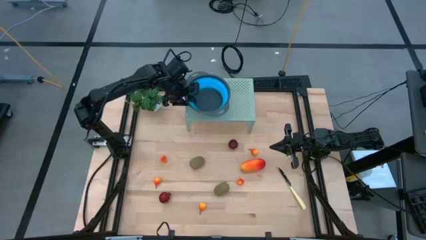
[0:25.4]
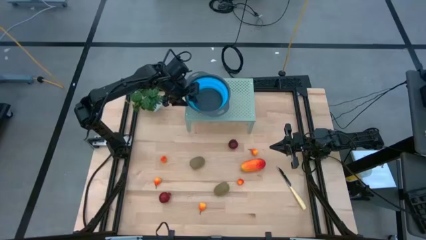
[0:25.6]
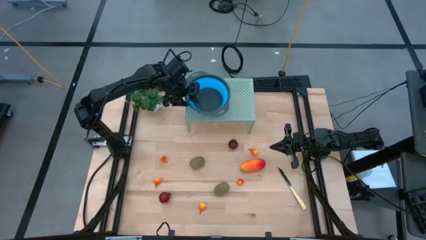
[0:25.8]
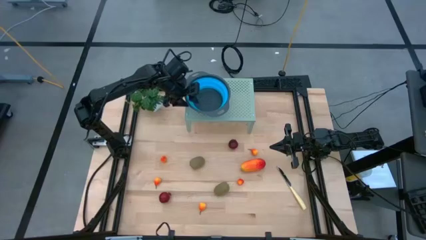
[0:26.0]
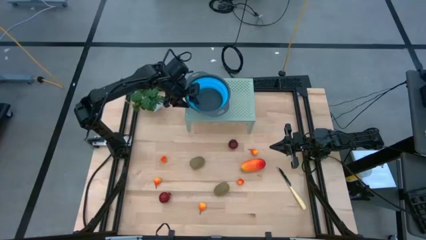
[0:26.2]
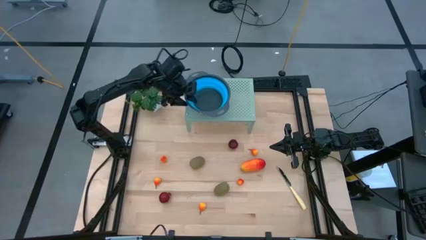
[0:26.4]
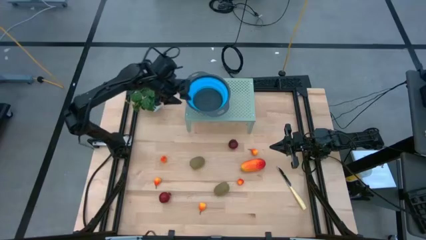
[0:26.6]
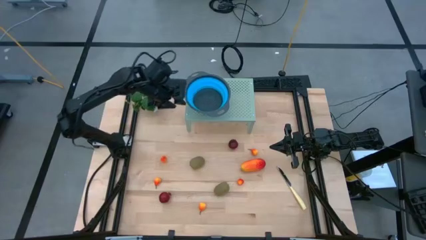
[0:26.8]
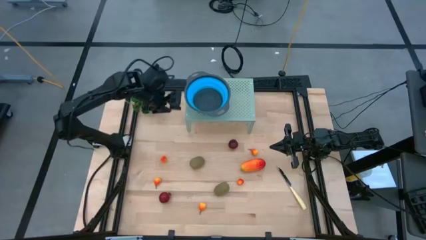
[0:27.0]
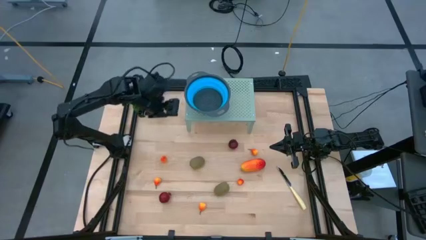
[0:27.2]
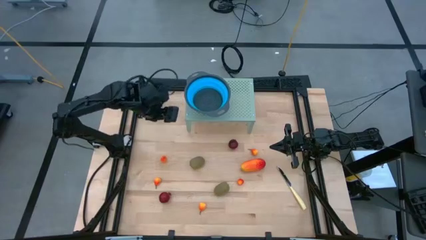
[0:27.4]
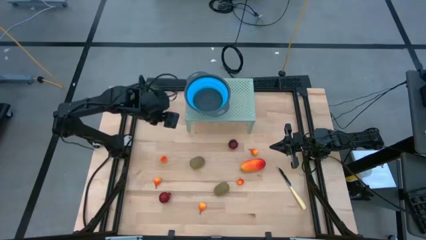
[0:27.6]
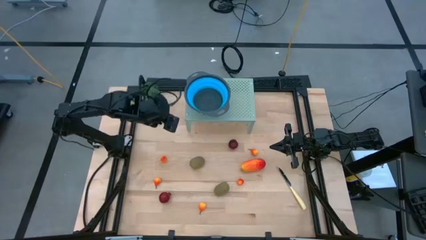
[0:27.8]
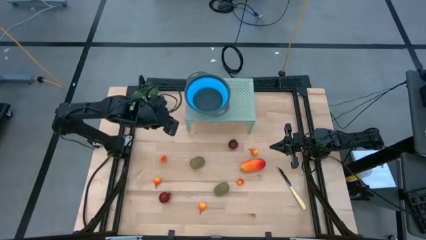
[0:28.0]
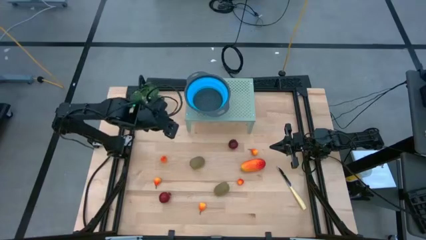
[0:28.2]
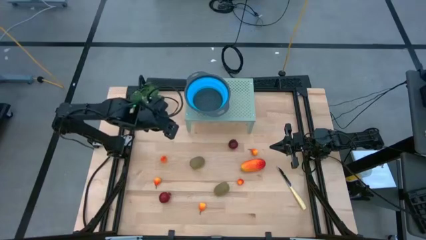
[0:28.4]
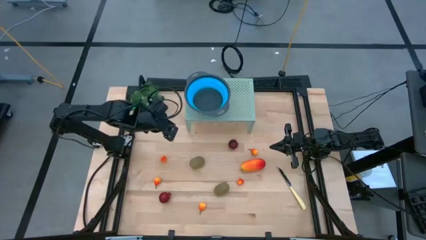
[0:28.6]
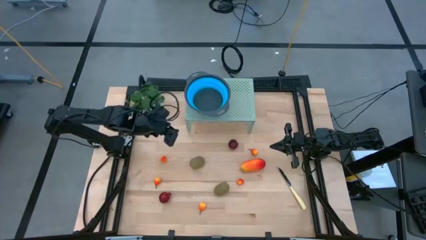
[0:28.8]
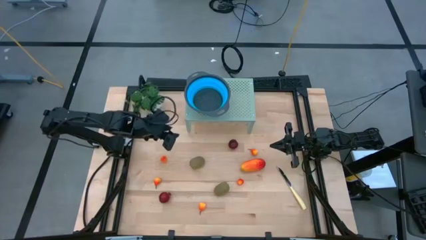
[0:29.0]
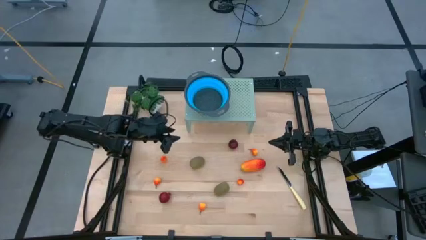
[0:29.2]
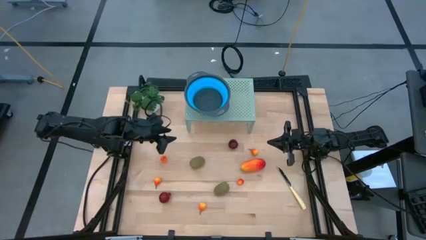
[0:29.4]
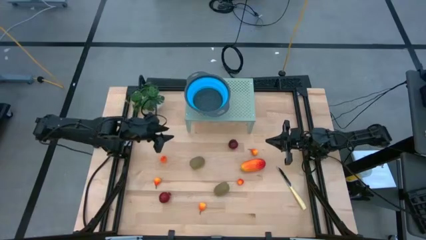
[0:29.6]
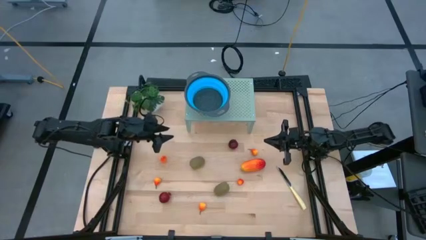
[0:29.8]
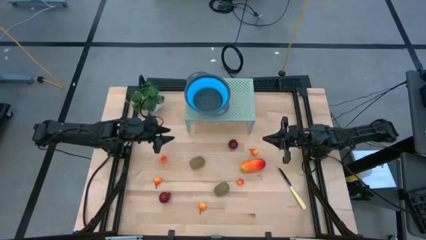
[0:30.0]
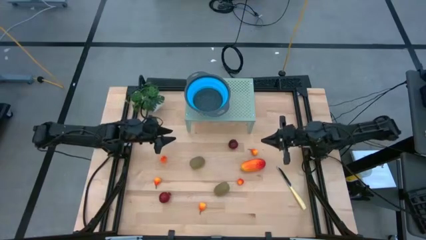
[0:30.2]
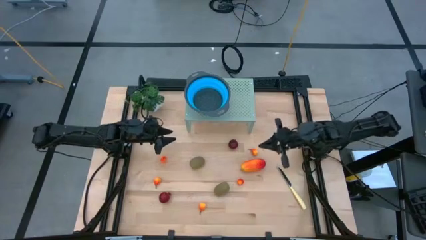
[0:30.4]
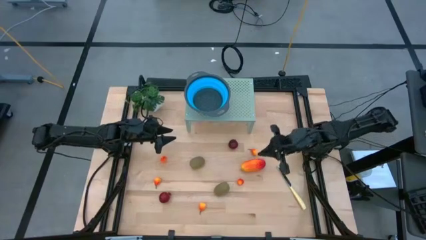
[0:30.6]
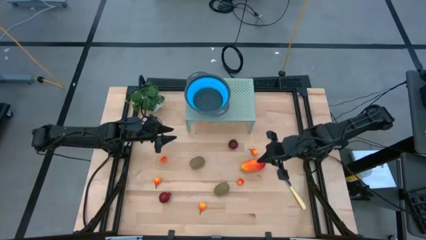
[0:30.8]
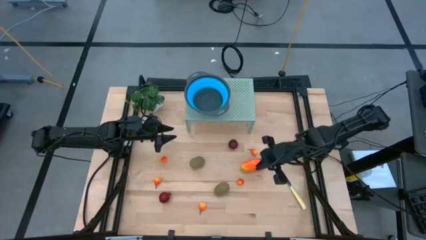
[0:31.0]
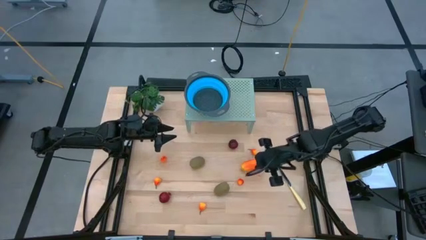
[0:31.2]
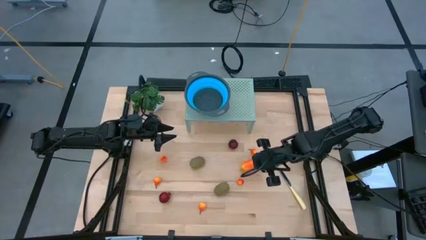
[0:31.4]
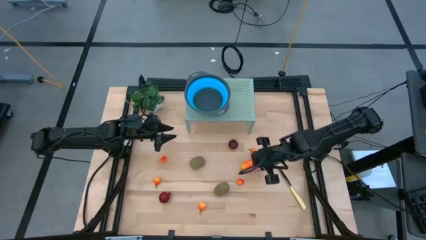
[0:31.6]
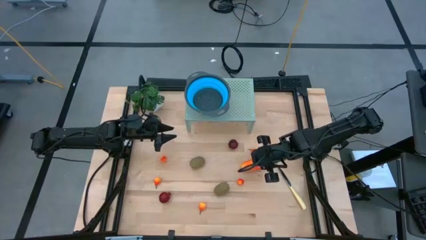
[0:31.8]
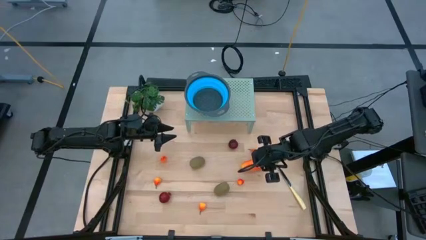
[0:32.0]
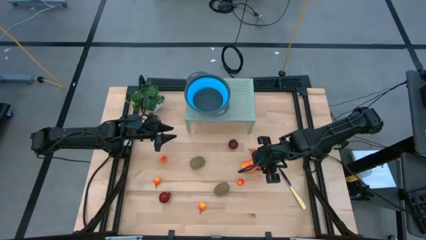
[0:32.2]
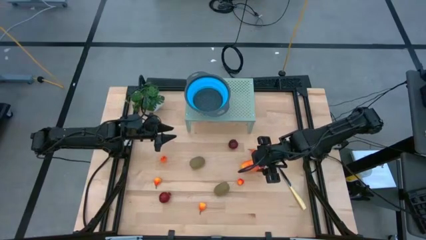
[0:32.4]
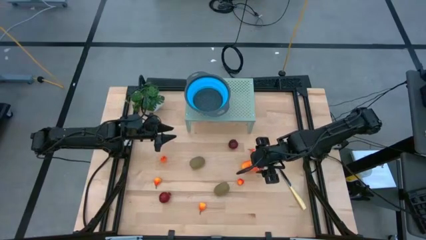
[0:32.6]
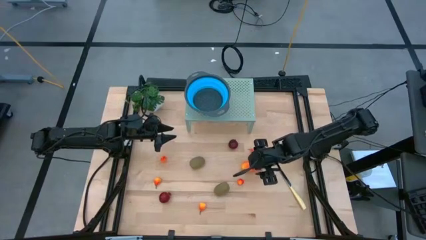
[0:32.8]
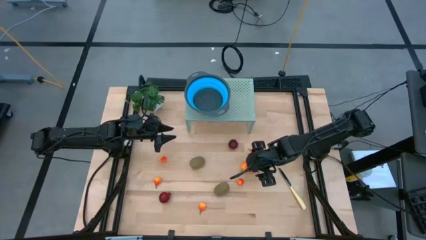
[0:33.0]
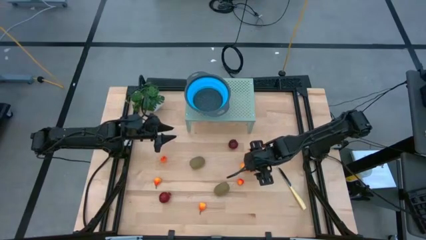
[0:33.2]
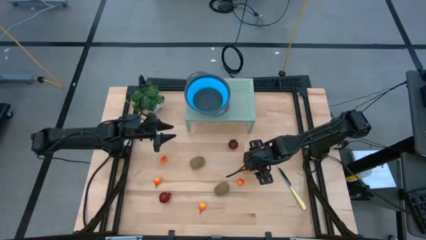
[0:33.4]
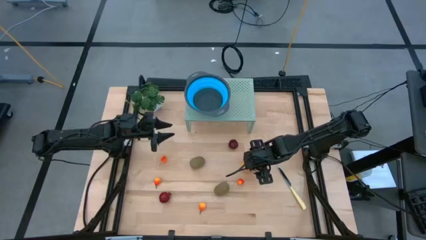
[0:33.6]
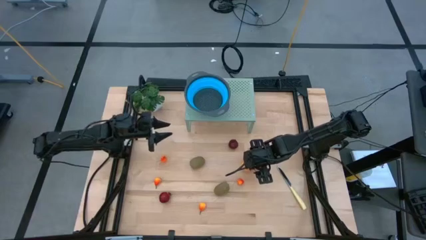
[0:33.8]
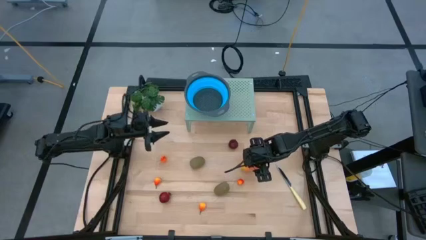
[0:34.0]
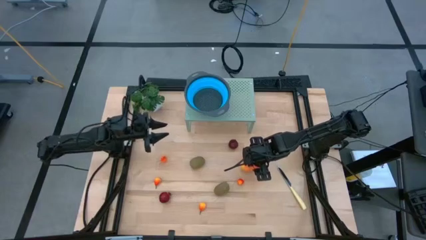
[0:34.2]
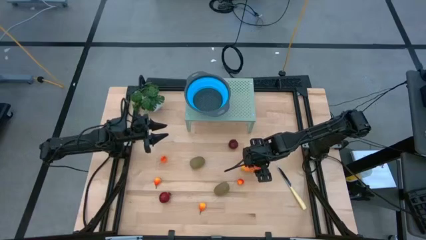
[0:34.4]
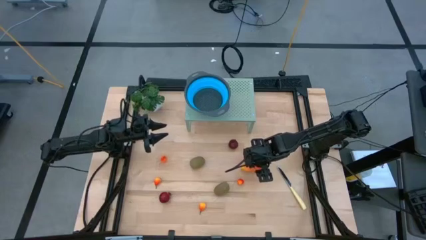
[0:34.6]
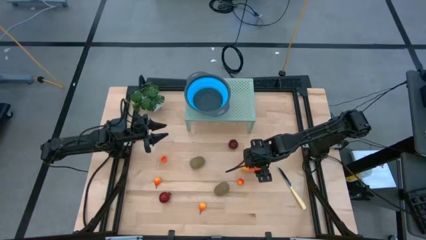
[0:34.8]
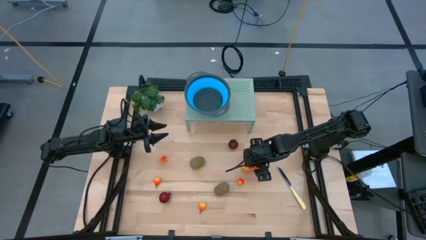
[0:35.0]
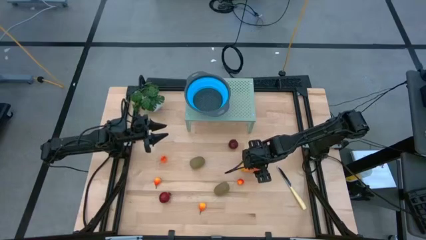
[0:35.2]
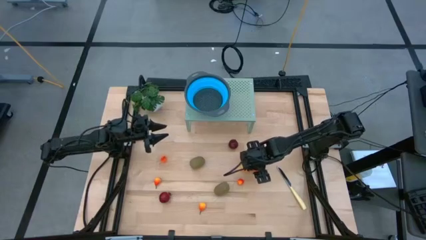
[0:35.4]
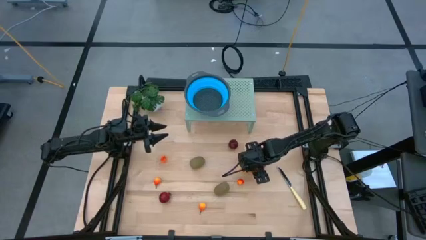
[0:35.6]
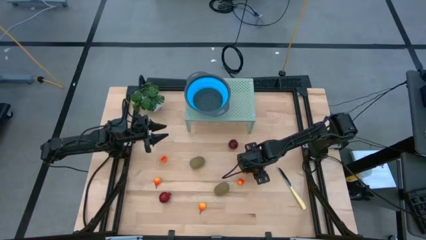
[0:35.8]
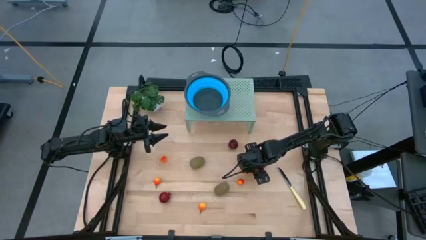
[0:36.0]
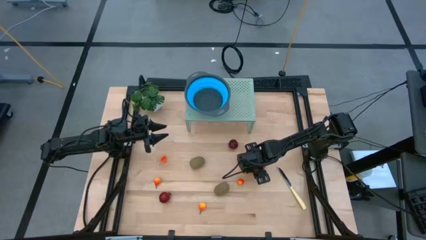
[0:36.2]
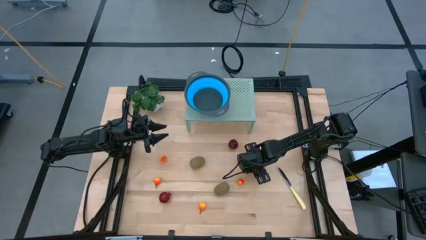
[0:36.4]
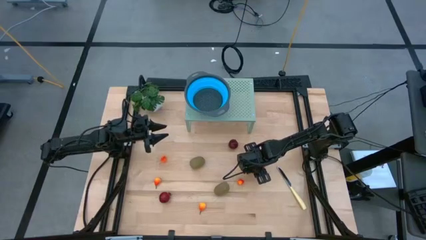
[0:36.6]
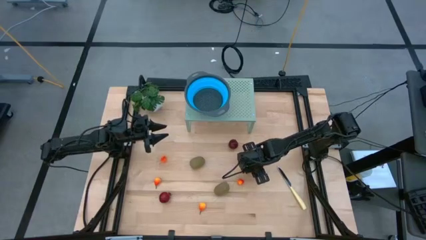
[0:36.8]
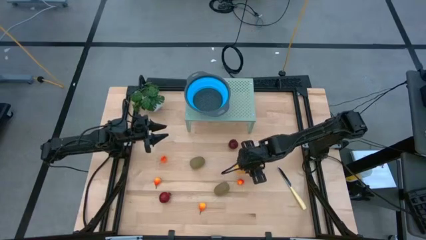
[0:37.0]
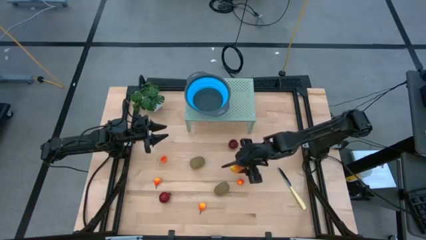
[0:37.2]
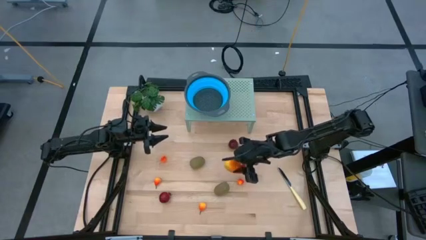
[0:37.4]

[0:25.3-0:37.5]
Task: Pick & Place Fruit
Put the yellow mango into the blue bowl on the shelf
